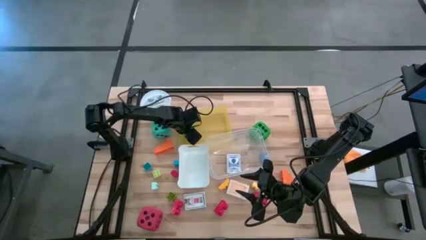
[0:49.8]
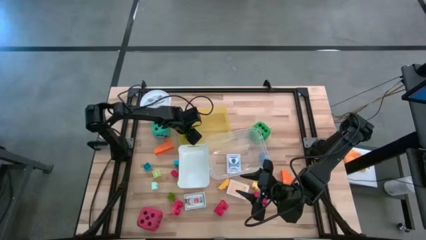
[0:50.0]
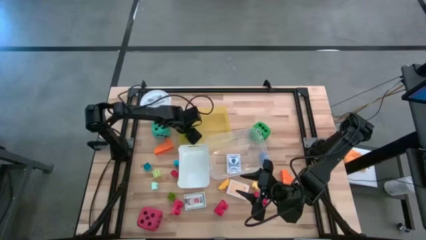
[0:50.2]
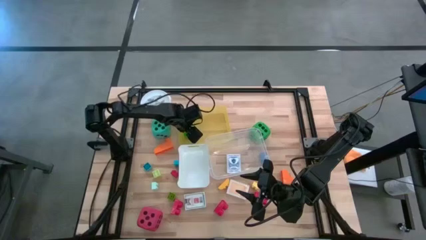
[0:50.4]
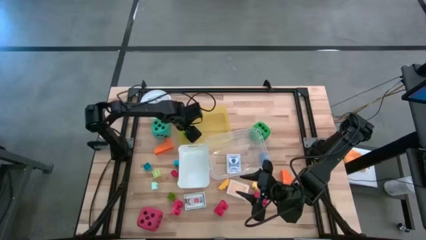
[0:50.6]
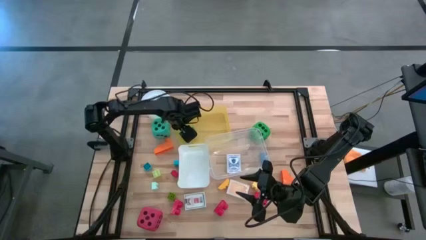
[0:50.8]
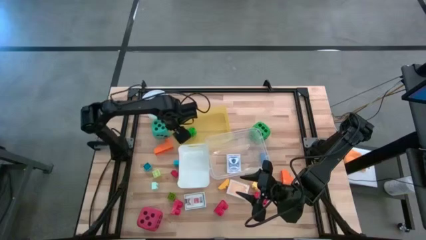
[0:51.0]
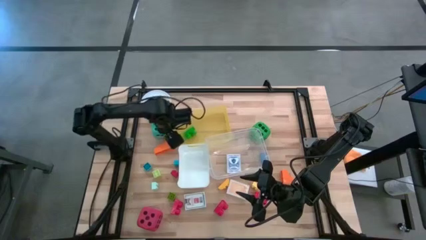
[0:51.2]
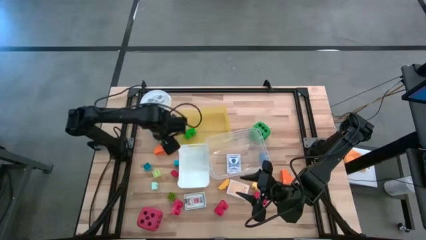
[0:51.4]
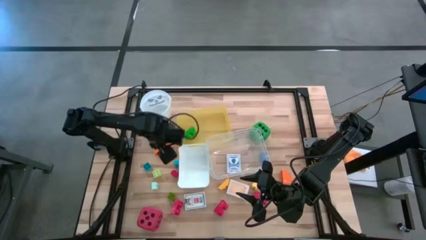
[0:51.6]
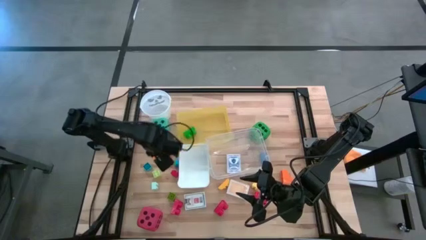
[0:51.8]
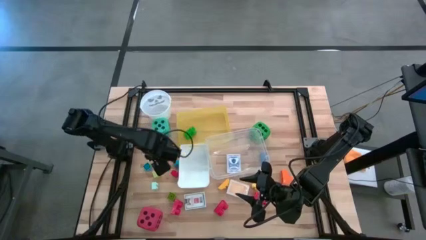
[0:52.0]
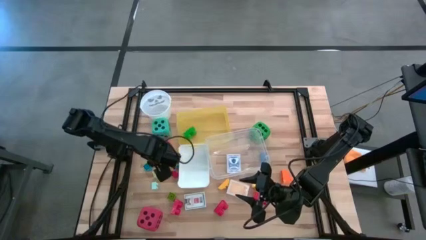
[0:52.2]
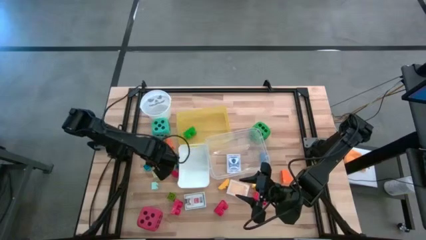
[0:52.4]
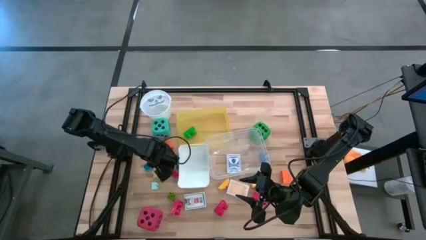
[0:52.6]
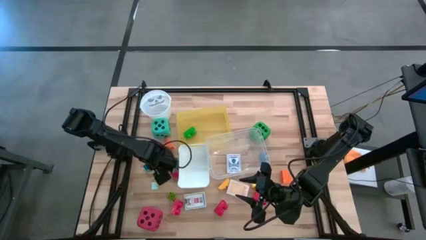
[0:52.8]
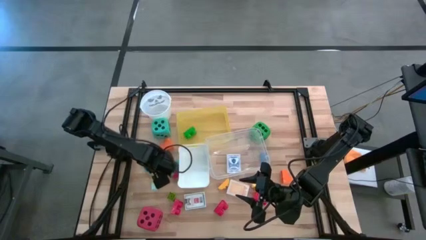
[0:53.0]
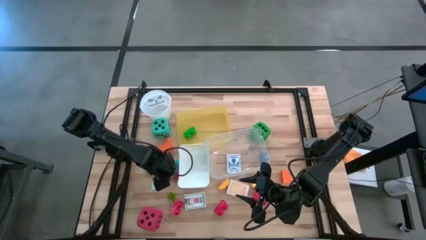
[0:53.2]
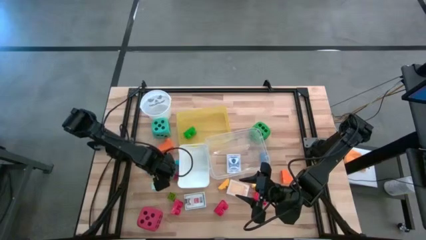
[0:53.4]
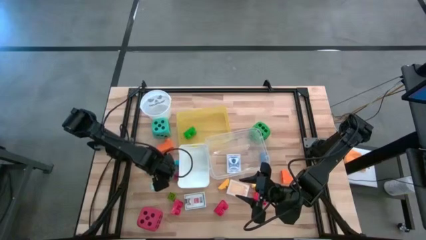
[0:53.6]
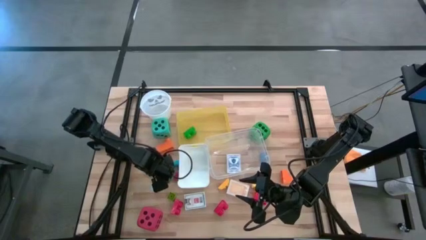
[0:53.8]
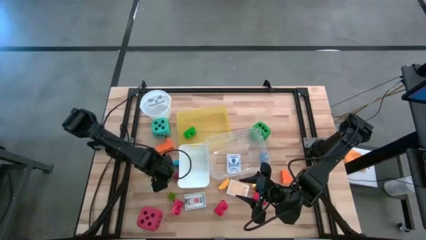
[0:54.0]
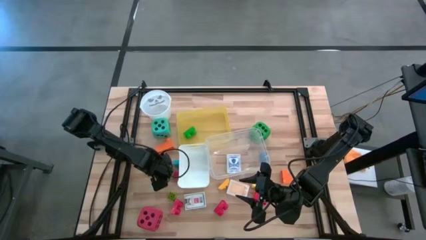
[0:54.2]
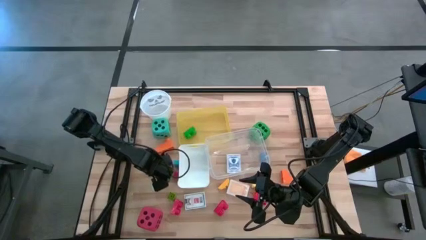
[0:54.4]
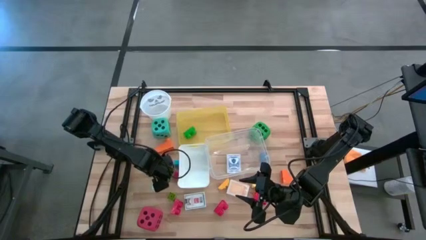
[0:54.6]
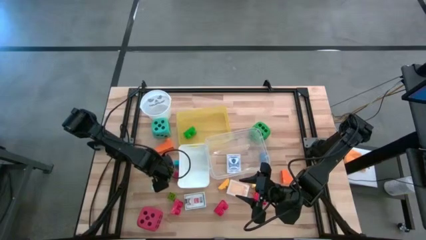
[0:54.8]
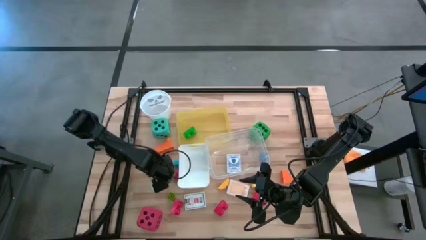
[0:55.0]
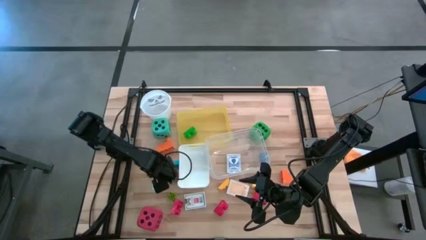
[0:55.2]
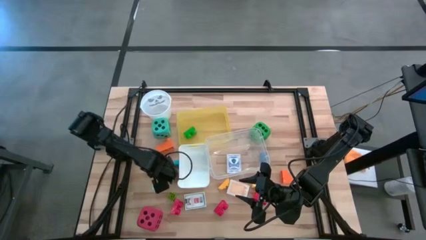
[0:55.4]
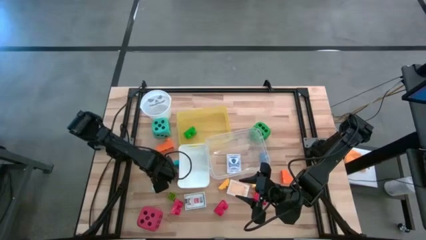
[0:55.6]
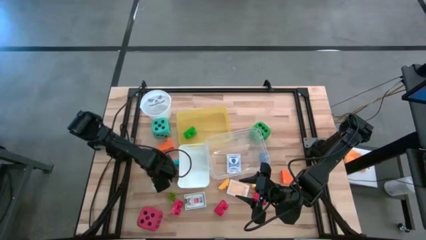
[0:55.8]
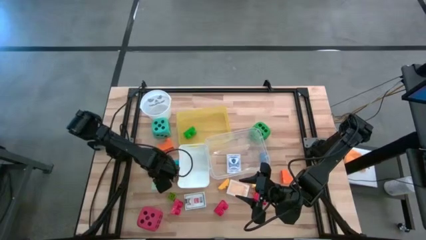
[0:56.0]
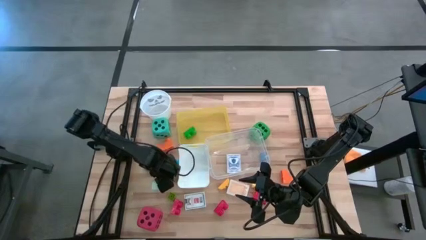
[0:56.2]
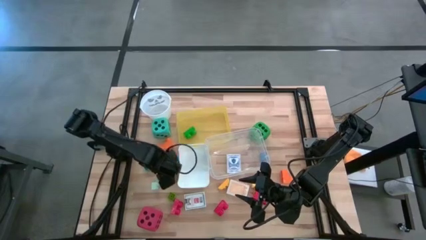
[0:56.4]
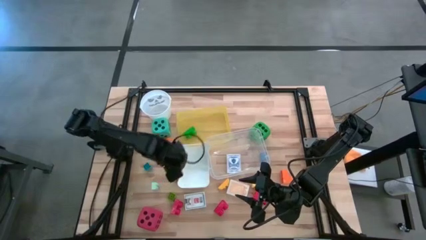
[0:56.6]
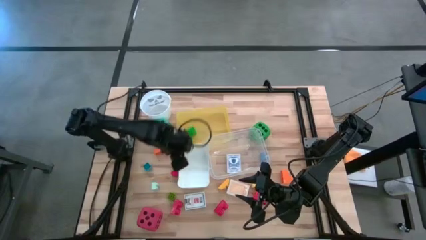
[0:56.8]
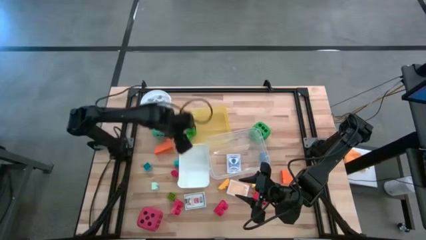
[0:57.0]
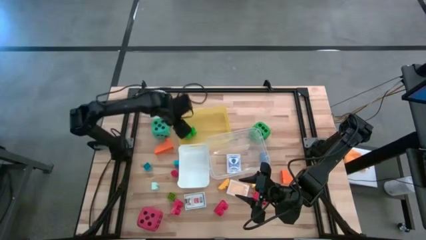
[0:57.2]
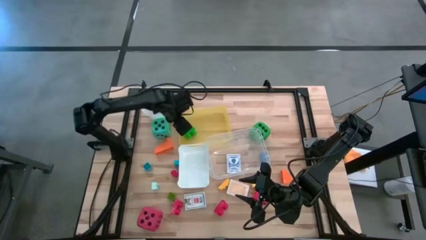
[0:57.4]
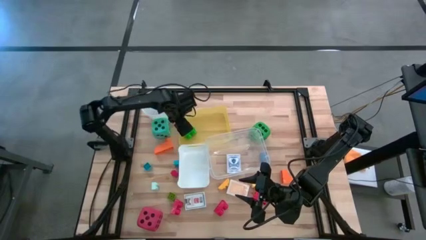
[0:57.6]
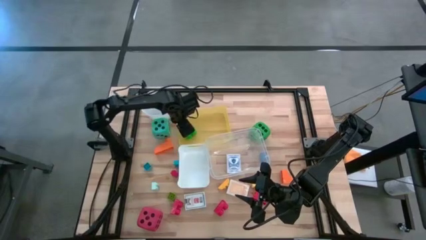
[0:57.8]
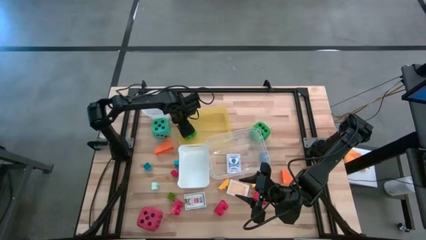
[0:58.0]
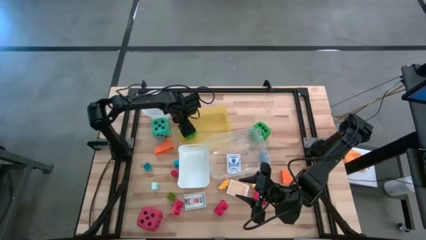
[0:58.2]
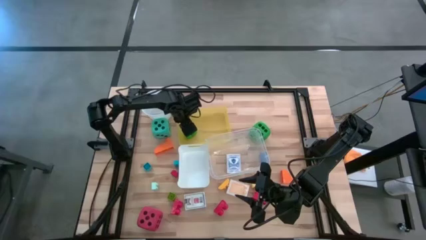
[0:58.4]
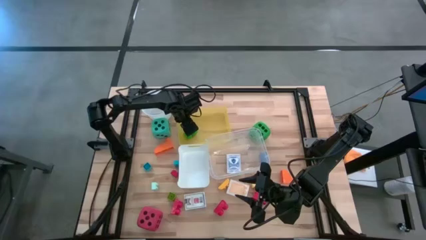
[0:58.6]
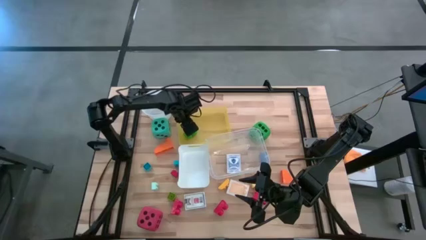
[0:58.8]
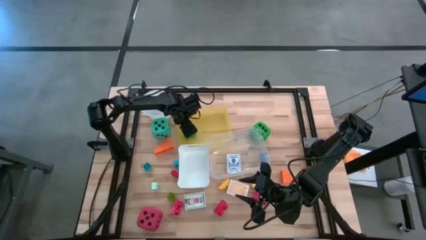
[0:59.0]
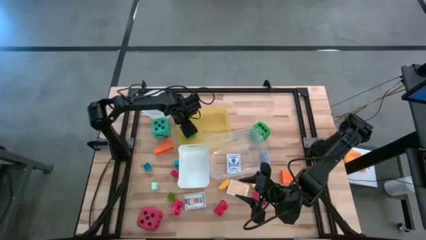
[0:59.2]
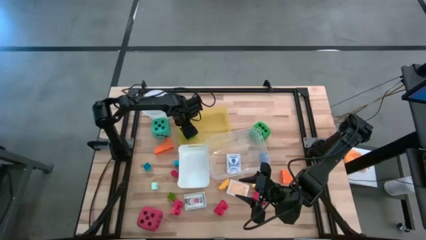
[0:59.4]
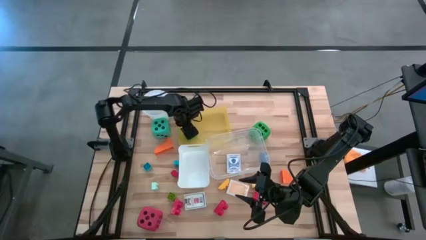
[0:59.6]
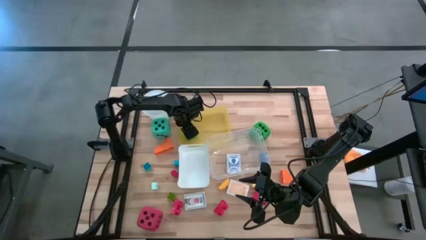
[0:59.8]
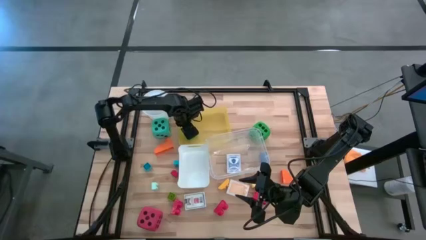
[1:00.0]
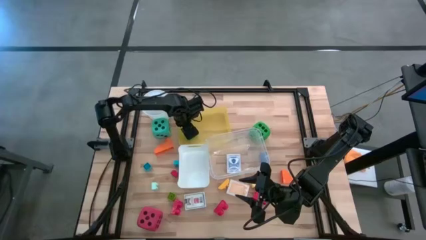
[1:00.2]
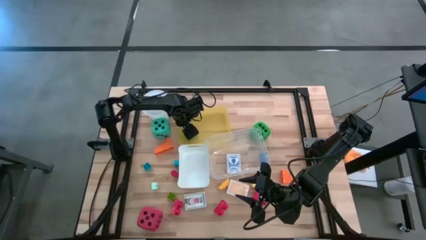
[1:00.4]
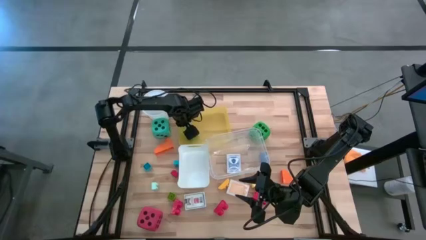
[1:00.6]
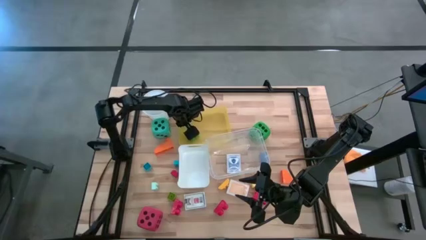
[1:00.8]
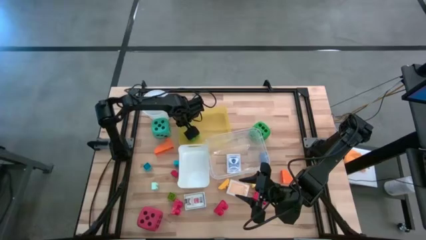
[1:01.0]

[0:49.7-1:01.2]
Task: Pick & Place Toys
Put the light green game piece into the yellow bin

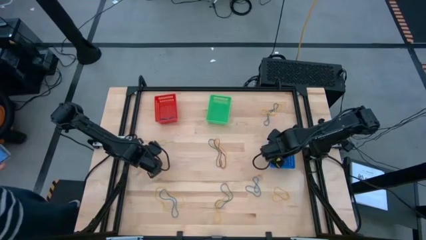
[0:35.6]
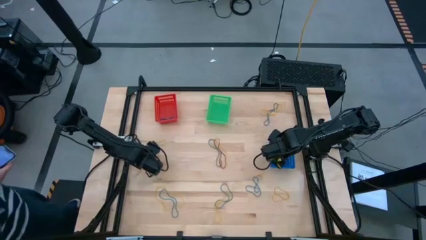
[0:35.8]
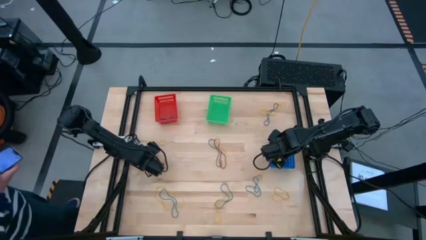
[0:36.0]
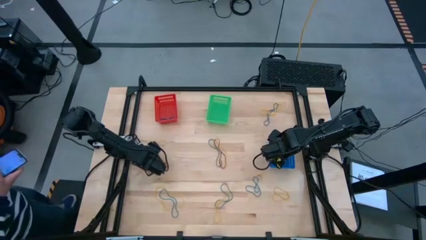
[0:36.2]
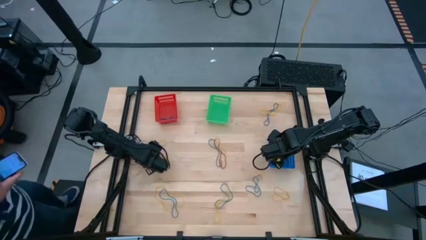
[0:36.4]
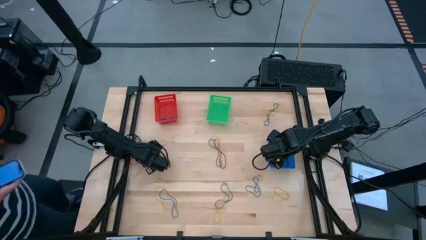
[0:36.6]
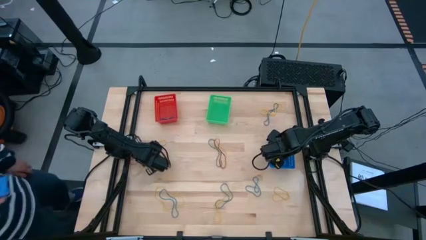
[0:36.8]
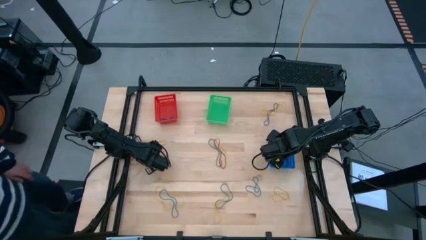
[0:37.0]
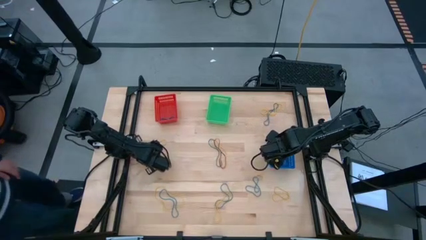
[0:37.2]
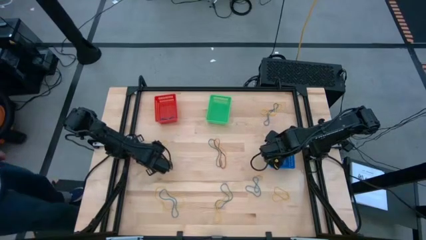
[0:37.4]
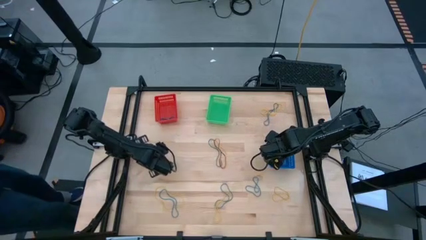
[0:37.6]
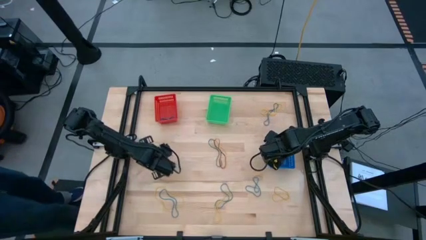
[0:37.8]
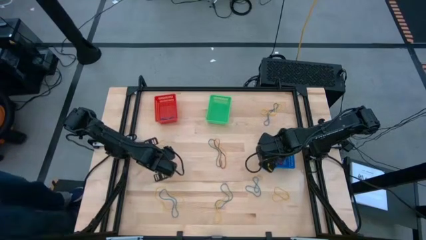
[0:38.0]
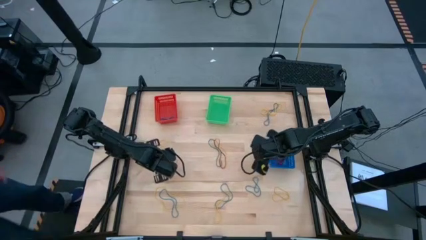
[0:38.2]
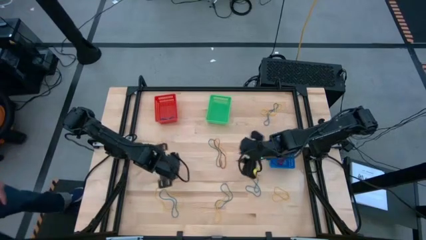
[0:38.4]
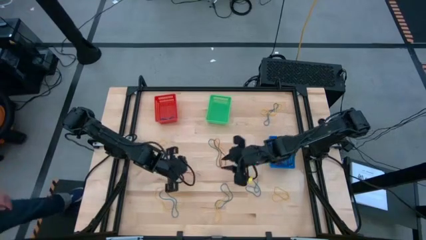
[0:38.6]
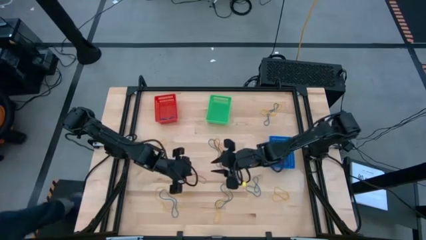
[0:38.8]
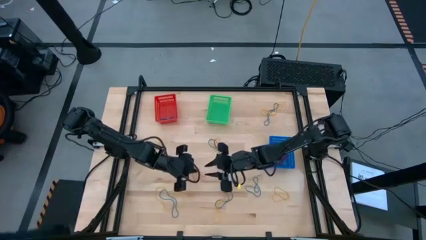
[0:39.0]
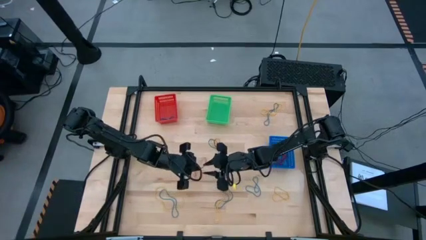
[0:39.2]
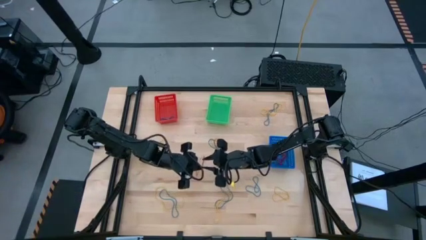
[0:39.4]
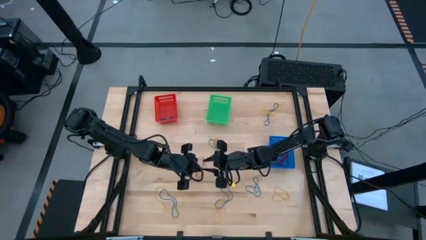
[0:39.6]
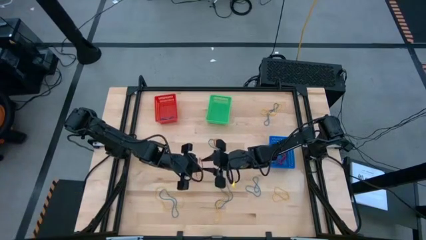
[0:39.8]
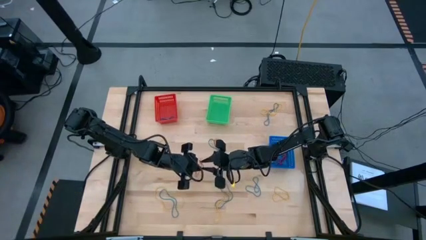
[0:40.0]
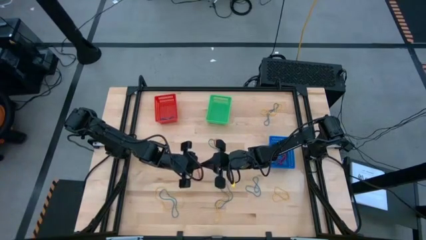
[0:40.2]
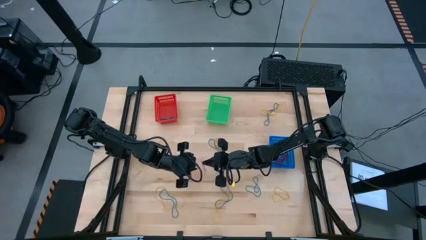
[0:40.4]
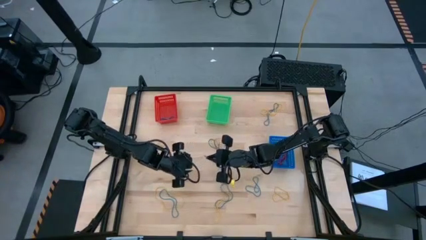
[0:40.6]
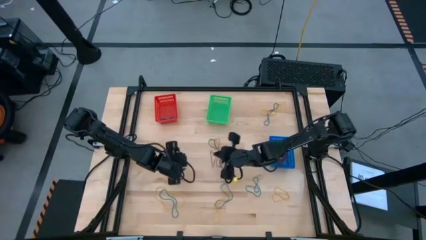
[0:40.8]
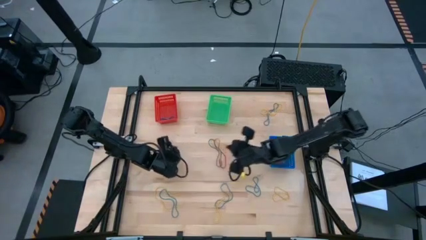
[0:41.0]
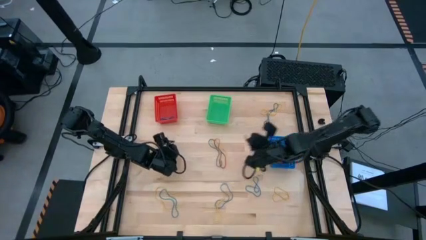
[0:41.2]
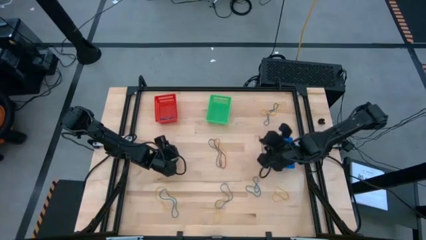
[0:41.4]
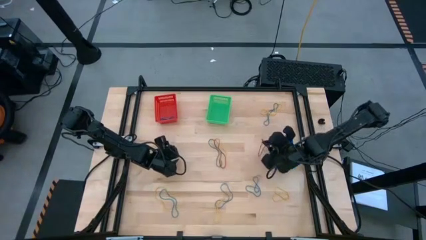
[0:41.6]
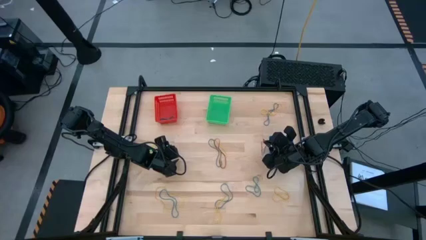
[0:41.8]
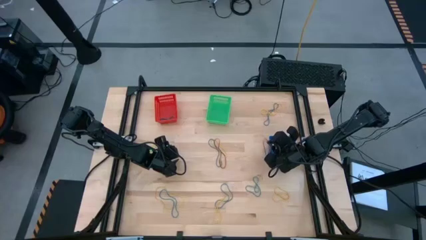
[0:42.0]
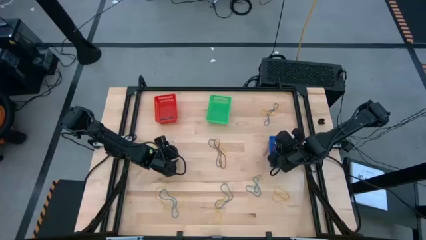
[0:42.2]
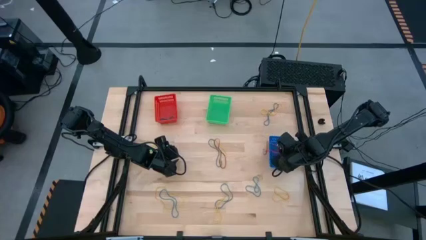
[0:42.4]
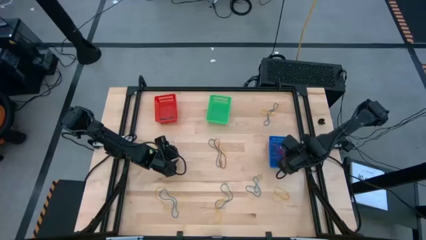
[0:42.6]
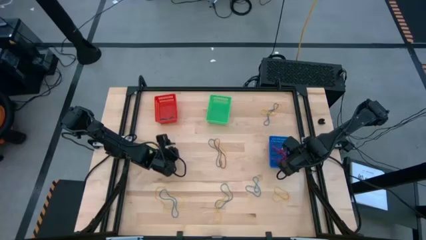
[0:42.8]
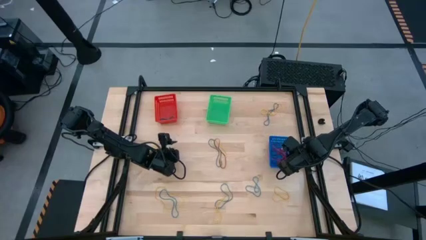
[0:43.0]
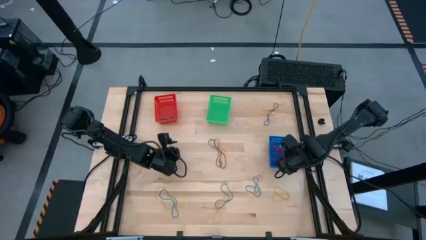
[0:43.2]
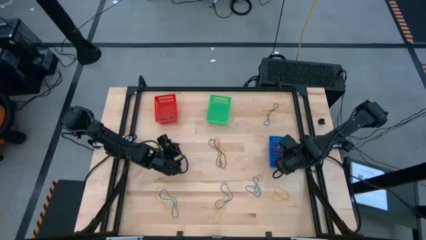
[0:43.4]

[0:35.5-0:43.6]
Task: Sort rubber bands into baskets
Put the red rubber band into the blue bin
